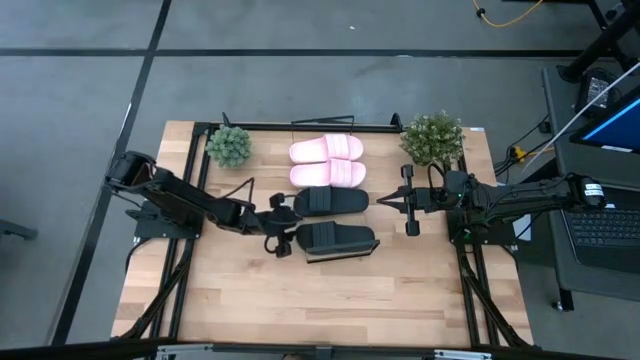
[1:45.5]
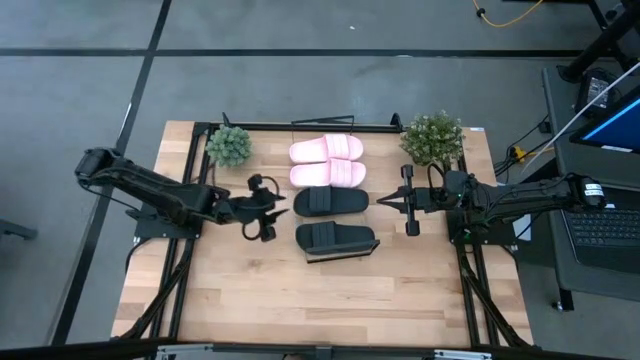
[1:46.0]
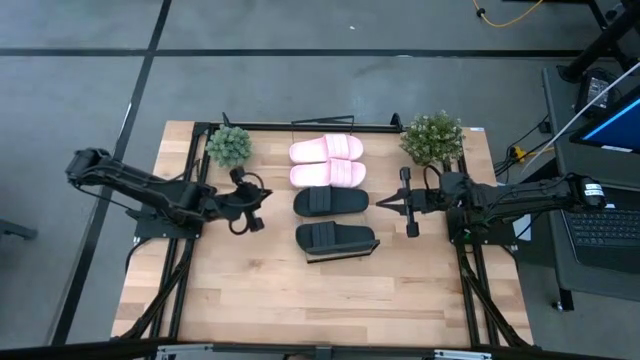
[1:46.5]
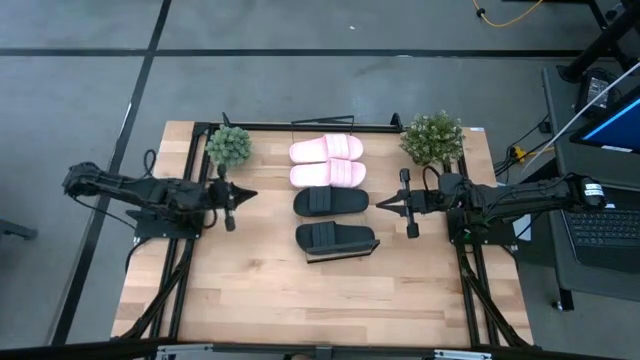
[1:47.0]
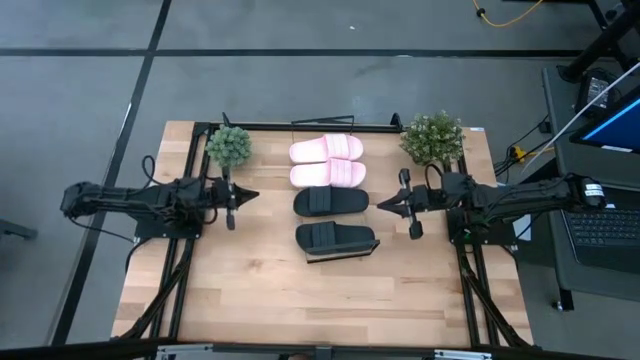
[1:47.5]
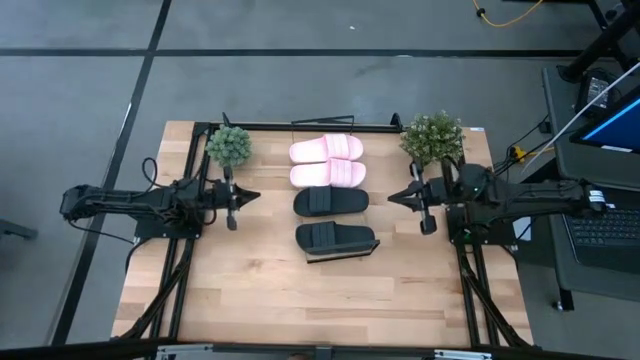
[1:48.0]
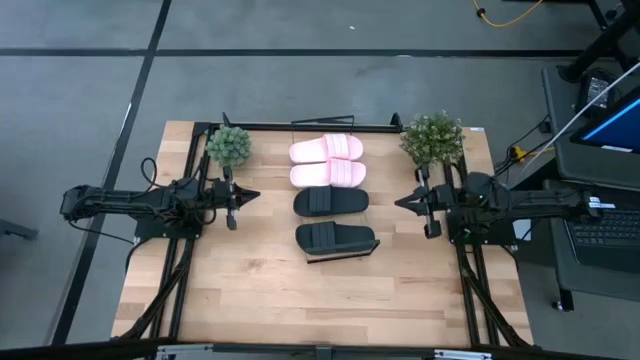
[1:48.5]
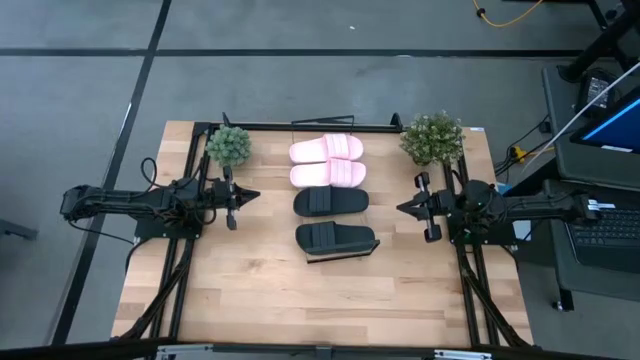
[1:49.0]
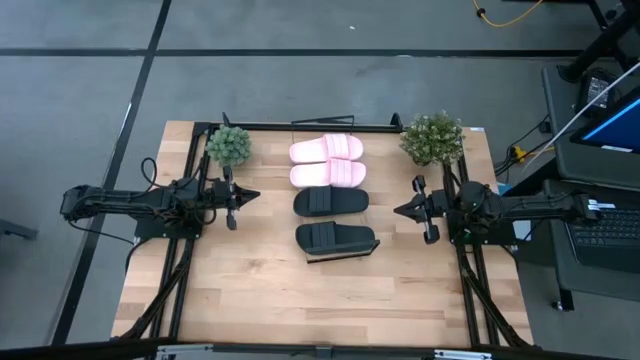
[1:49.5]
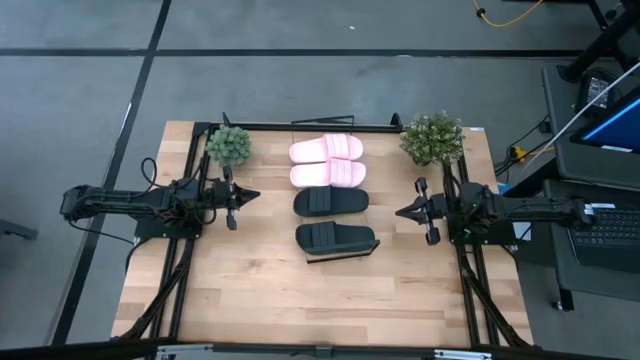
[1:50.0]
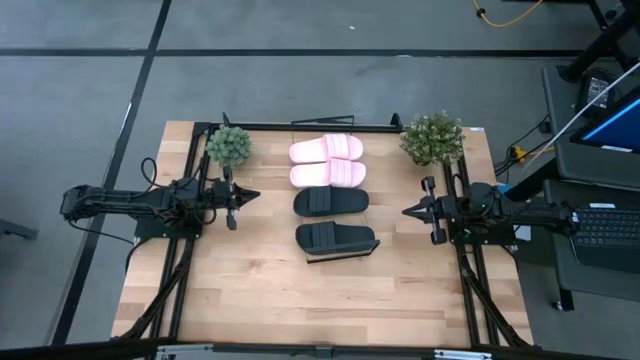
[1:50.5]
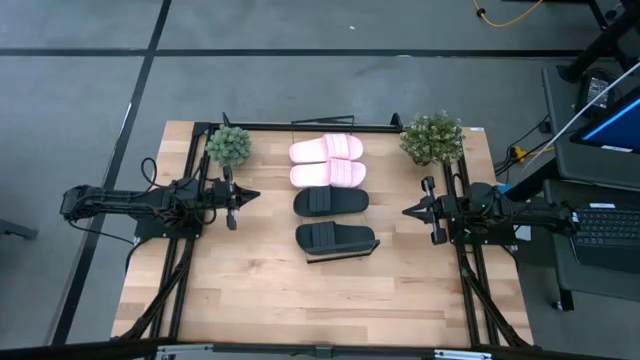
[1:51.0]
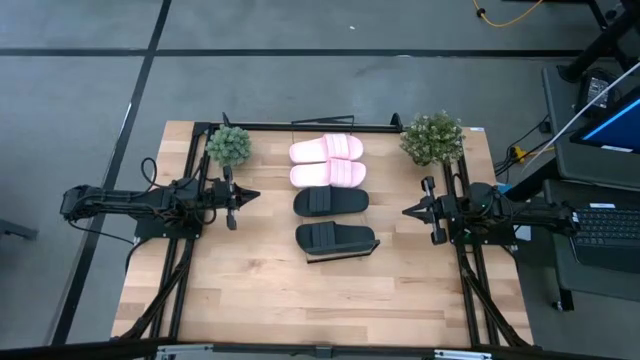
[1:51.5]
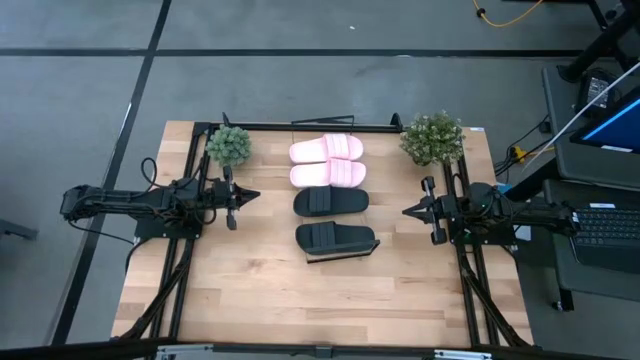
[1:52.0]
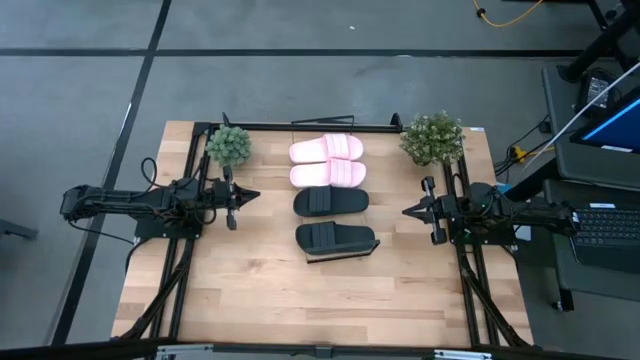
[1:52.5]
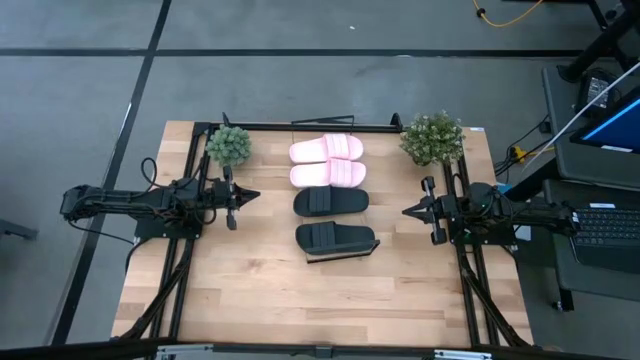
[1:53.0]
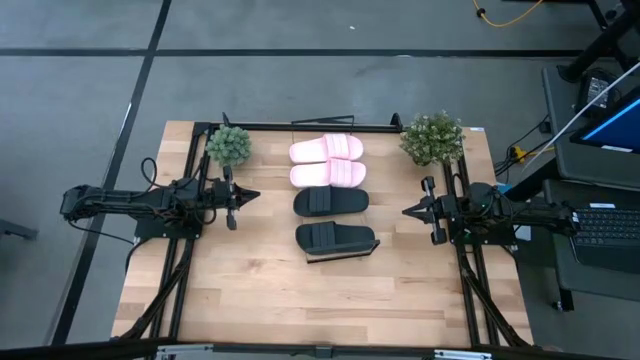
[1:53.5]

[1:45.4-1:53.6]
Task: Pick and place slides into the shelf
Return to Home Position

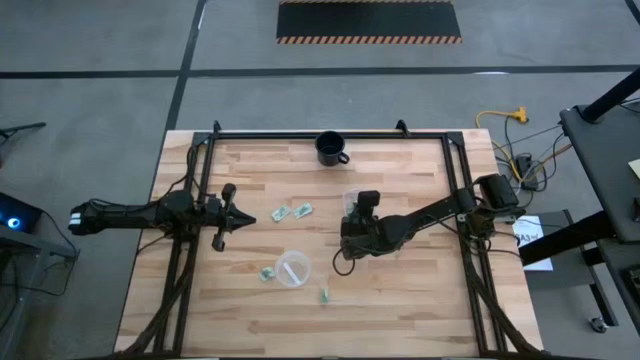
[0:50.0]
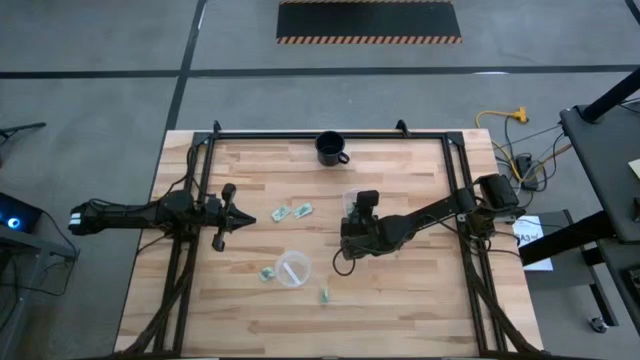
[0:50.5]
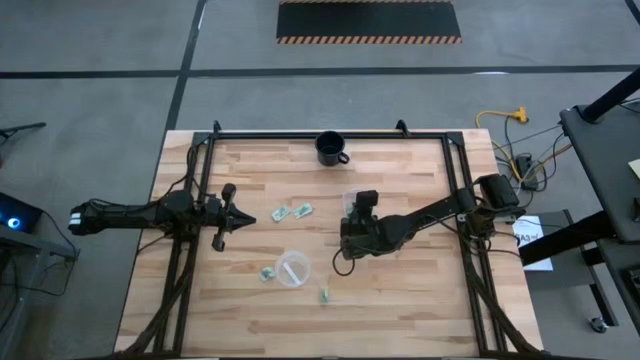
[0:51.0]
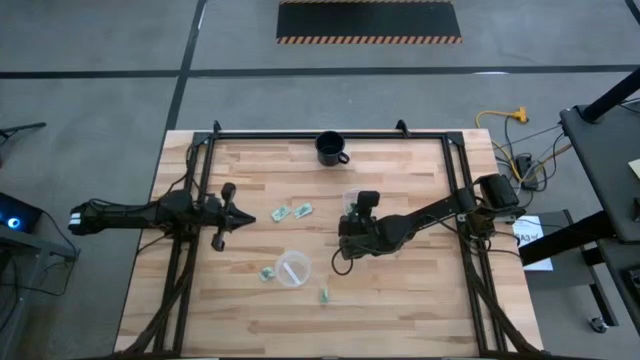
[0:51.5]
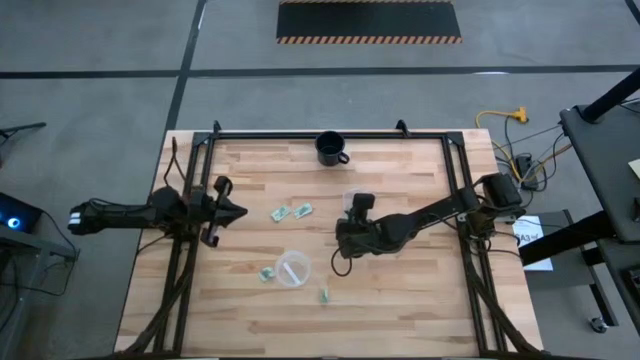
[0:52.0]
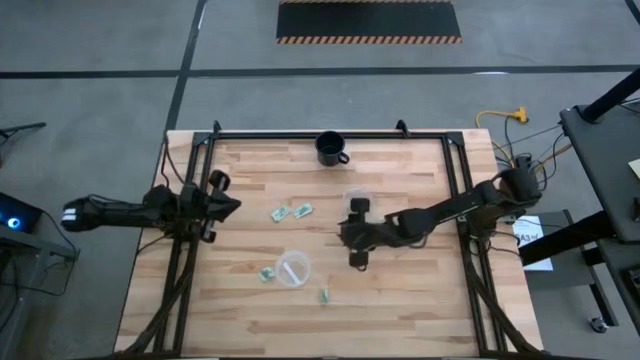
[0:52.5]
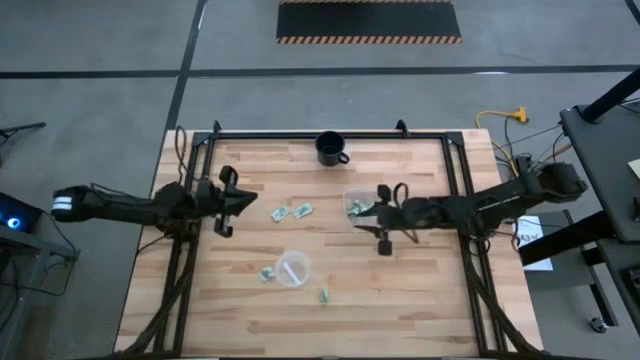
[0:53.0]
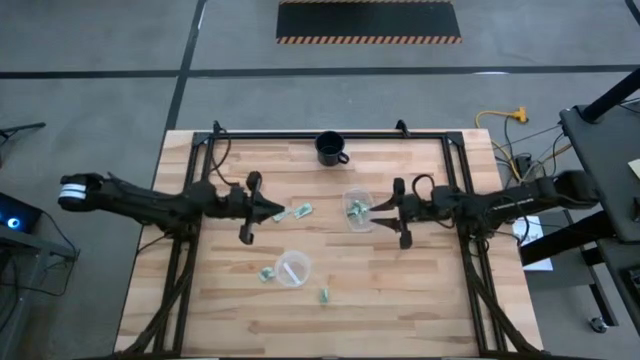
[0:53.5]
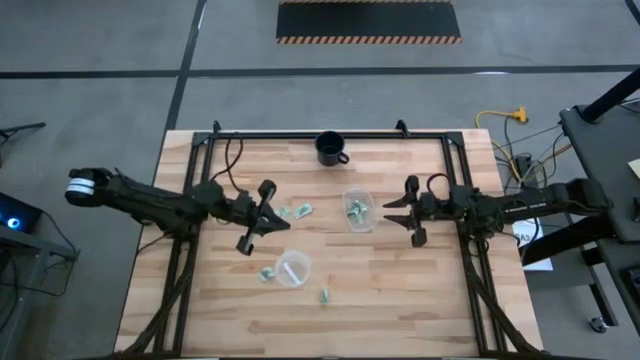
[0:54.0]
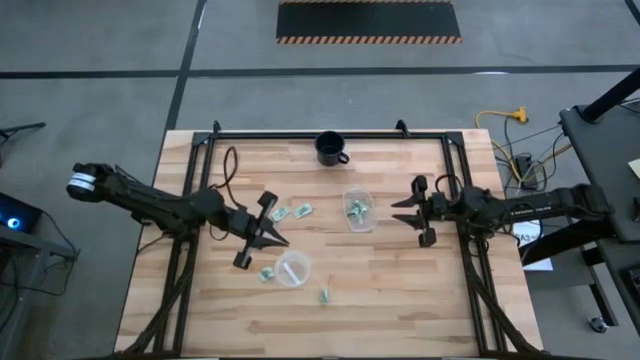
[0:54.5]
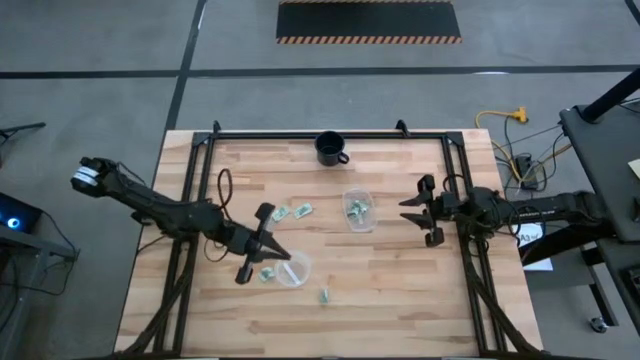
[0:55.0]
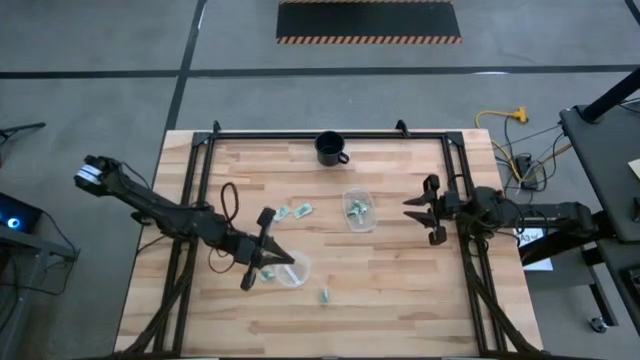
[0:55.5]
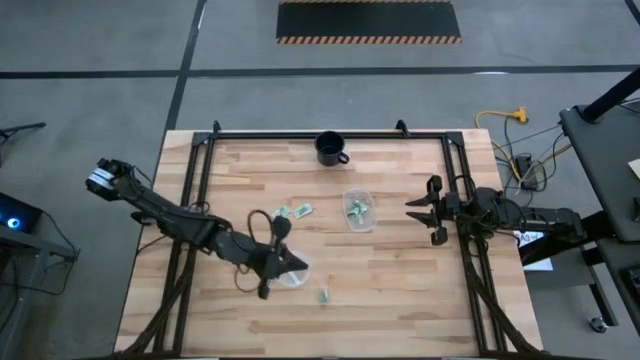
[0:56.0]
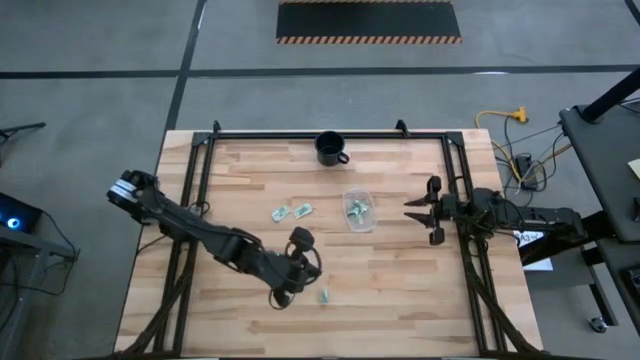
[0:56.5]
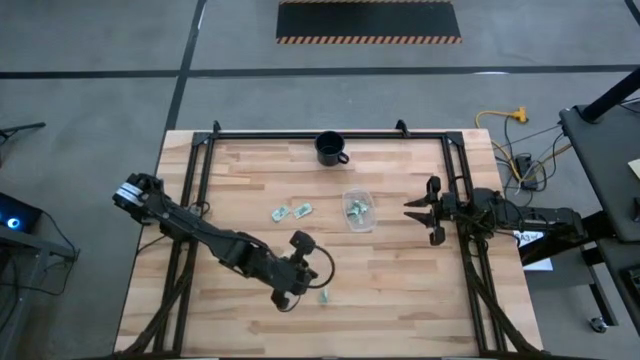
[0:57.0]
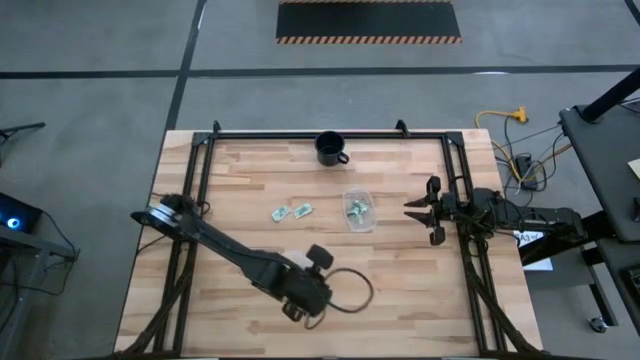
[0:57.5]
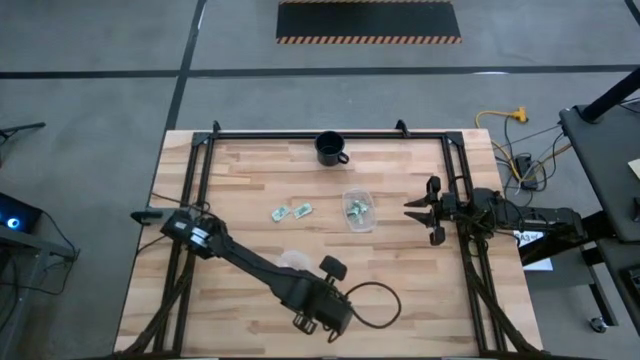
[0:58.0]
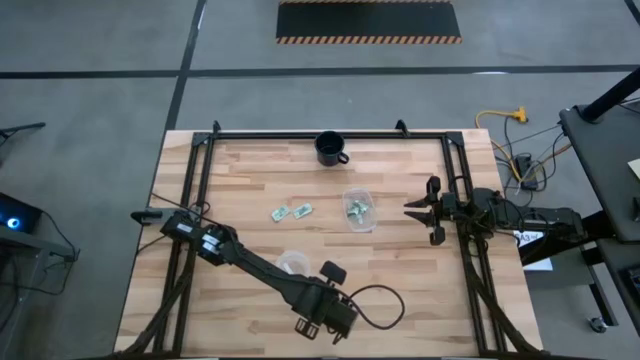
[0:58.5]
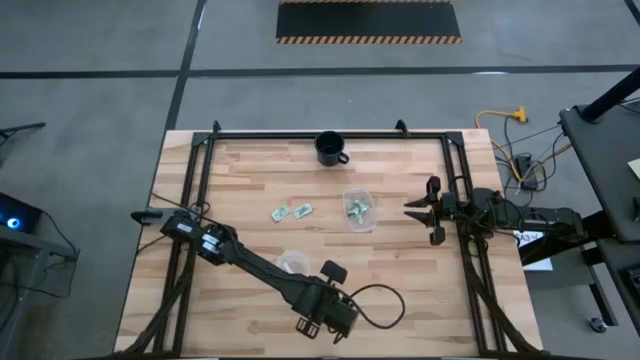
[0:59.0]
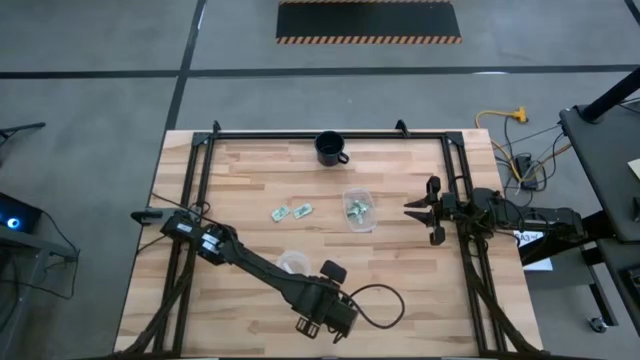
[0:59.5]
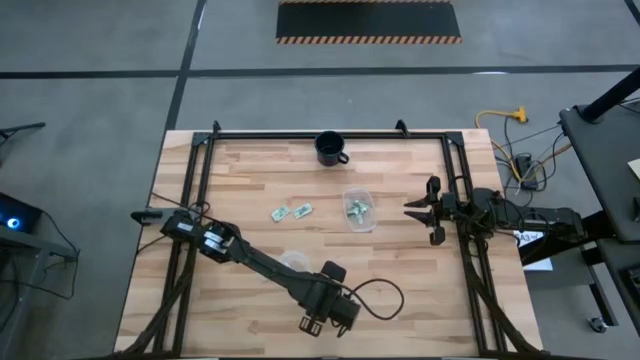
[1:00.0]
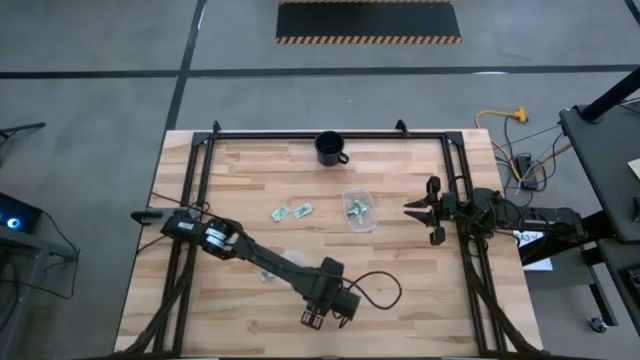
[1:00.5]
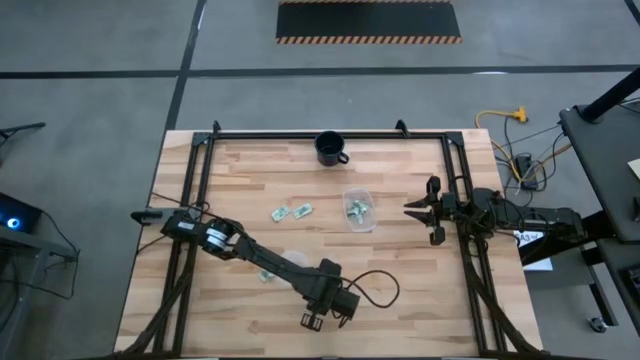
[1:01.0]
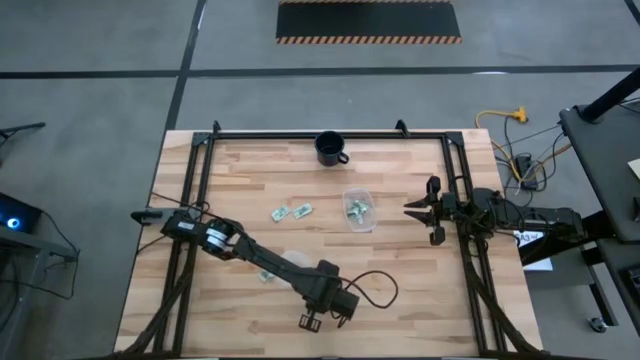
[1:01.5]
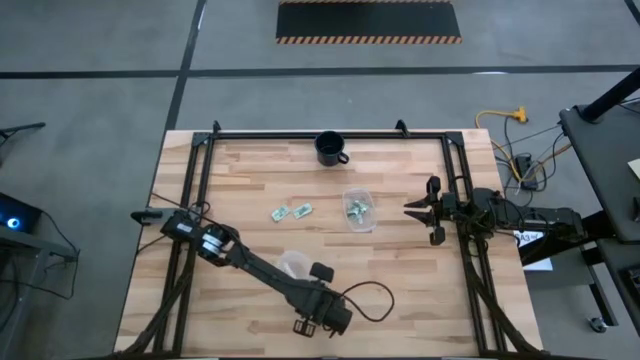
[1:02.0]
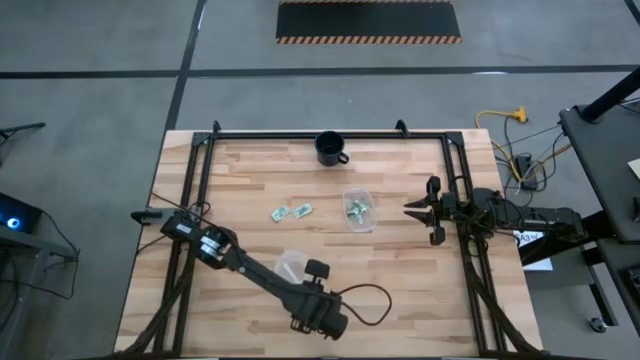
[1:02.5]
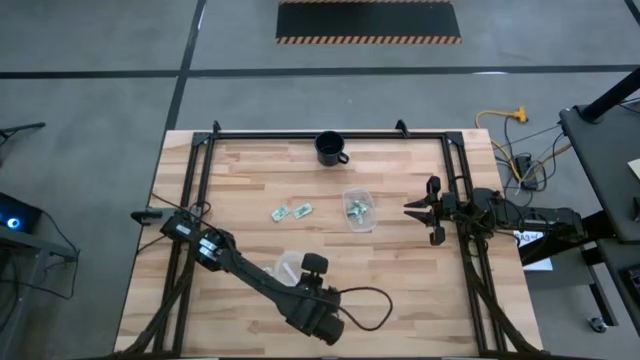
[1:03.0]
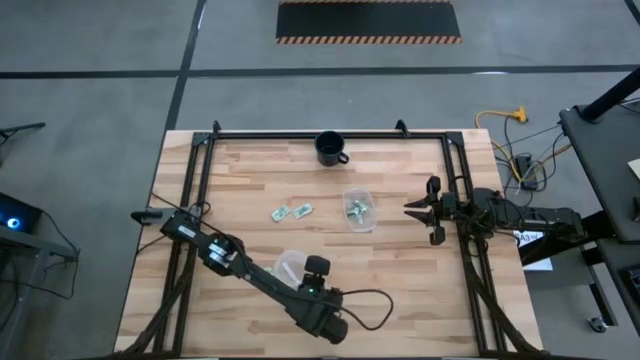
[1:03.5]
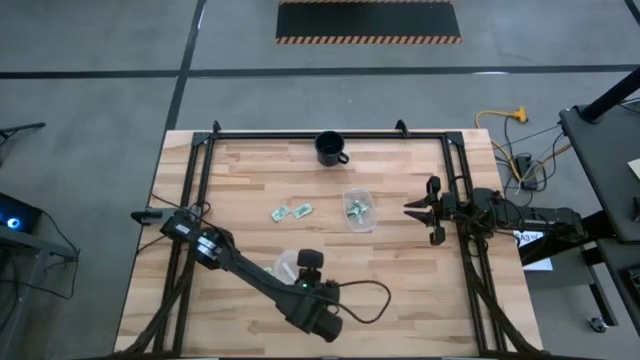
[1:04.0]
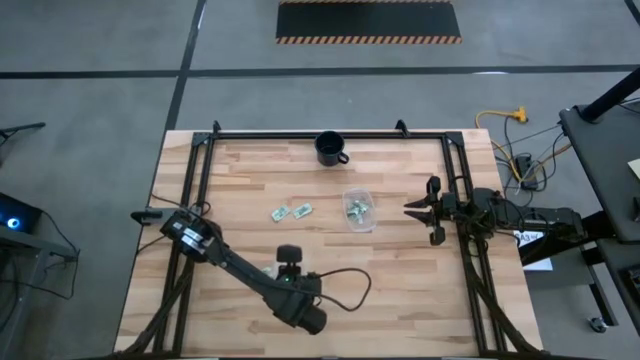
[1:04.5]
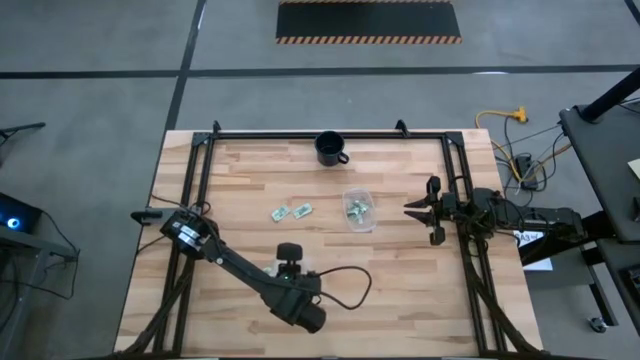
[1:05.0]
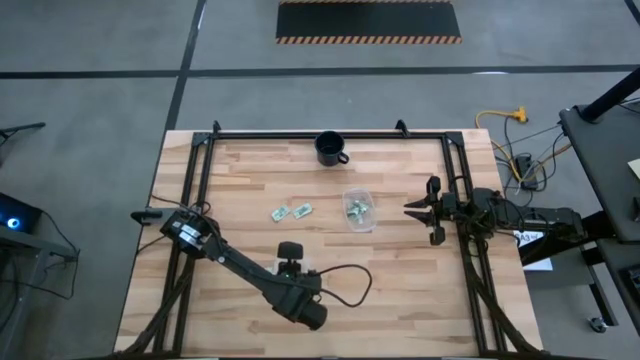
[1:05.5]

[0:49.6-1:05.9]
Task: Pick and place items into bin
Put the white stevia packet into the left transparent bin
